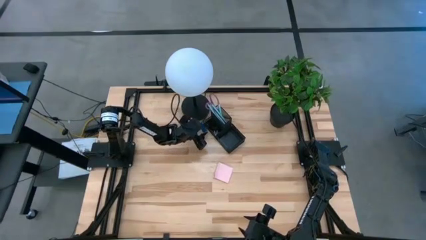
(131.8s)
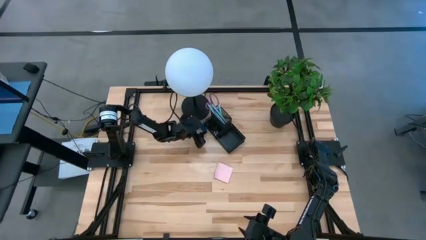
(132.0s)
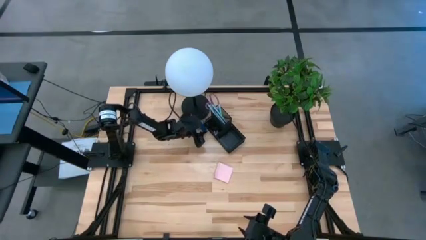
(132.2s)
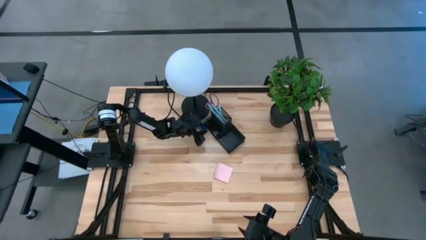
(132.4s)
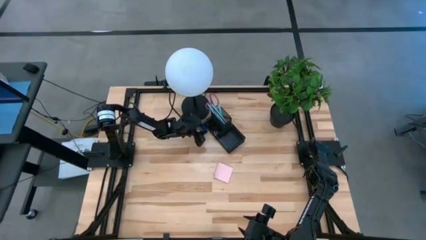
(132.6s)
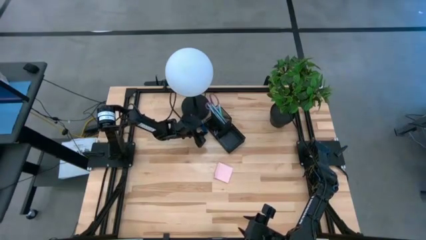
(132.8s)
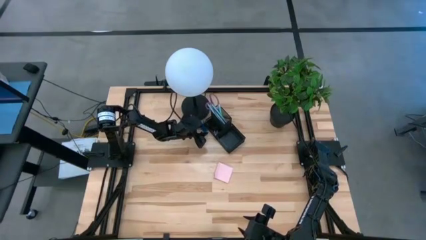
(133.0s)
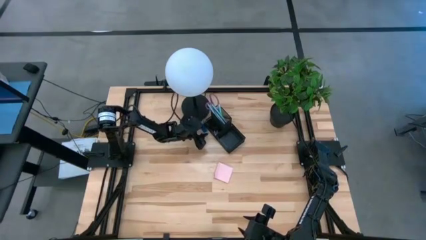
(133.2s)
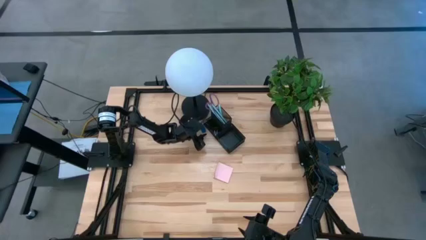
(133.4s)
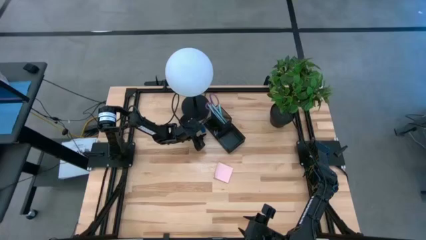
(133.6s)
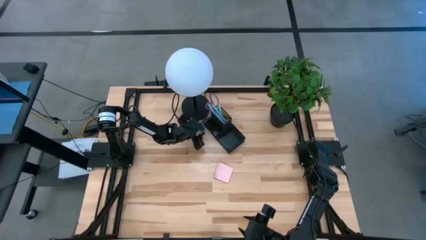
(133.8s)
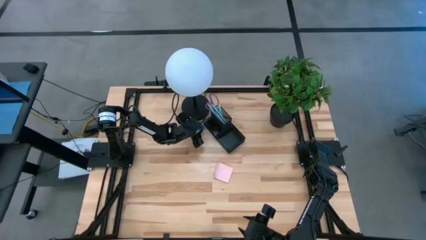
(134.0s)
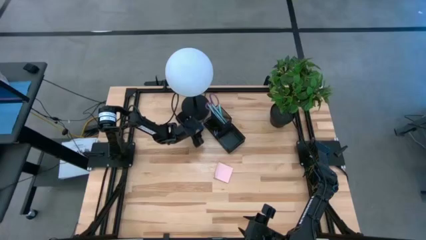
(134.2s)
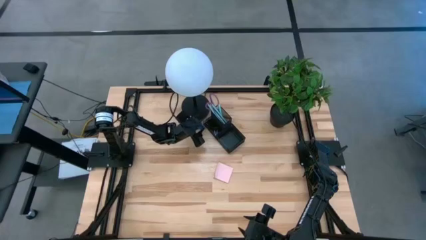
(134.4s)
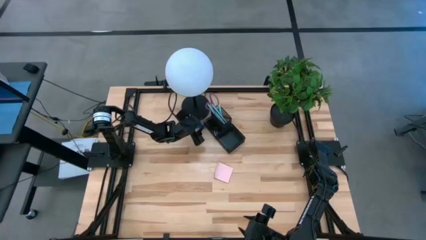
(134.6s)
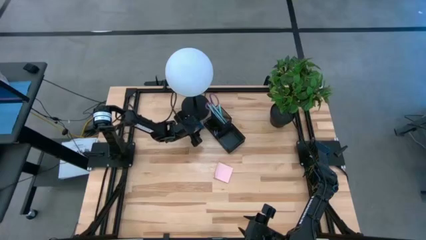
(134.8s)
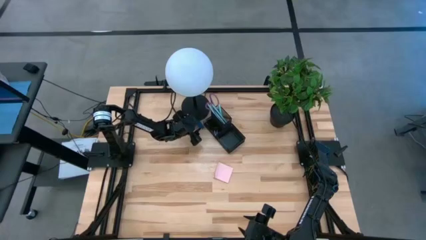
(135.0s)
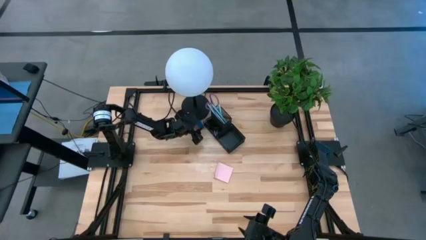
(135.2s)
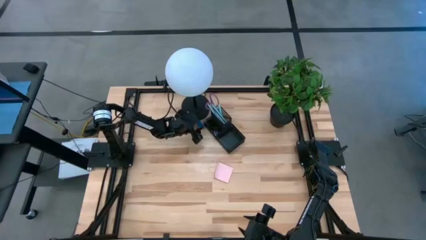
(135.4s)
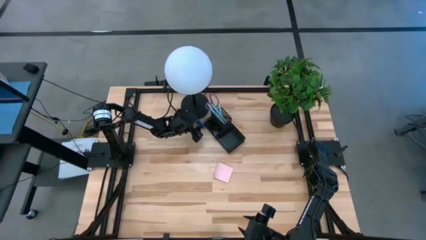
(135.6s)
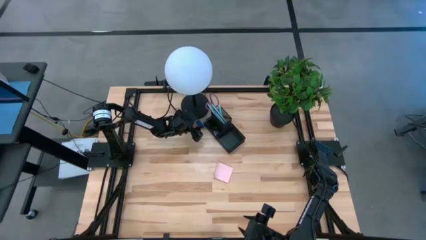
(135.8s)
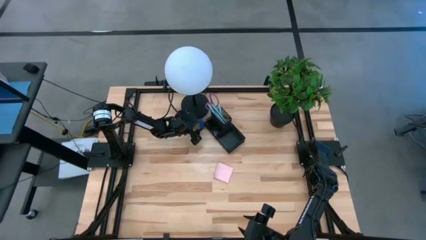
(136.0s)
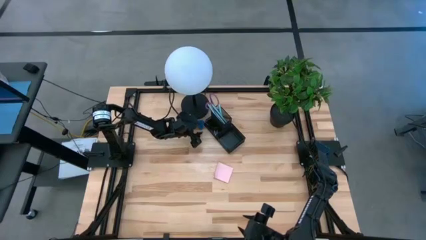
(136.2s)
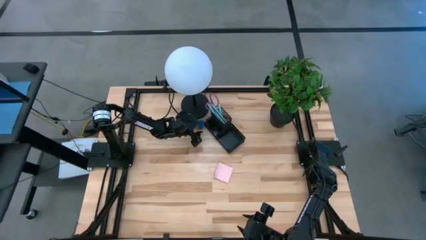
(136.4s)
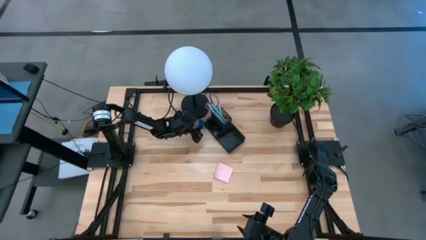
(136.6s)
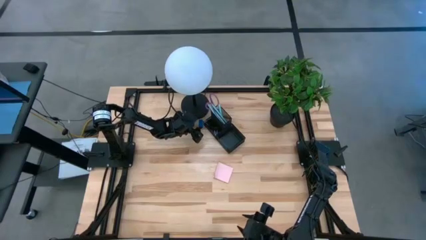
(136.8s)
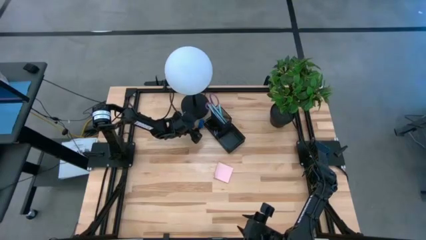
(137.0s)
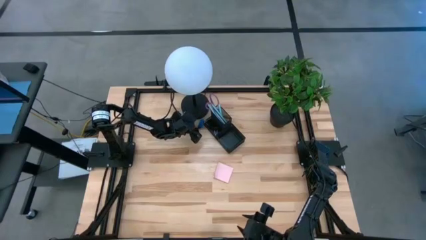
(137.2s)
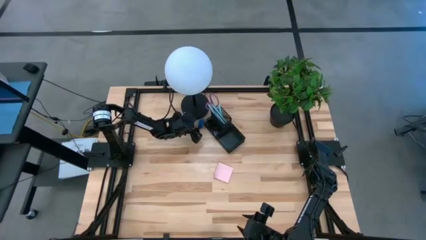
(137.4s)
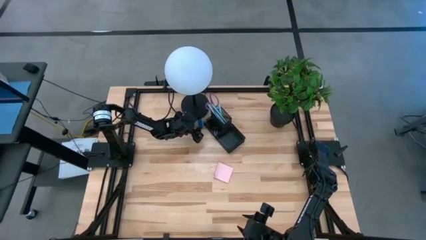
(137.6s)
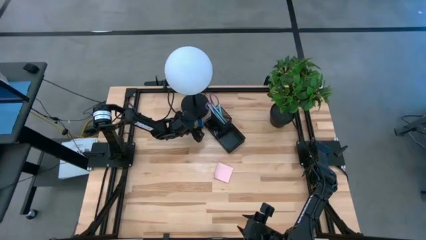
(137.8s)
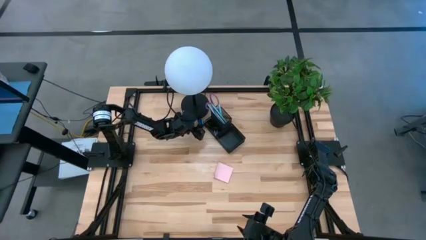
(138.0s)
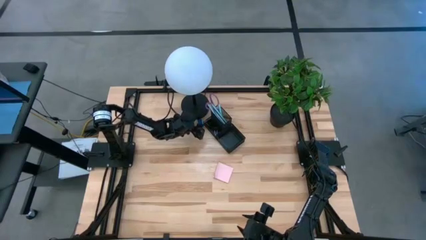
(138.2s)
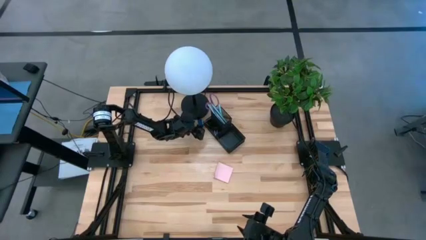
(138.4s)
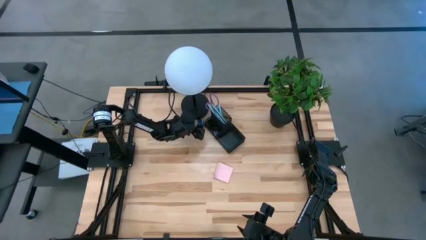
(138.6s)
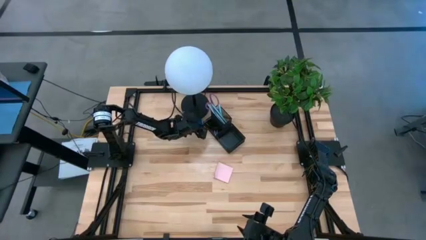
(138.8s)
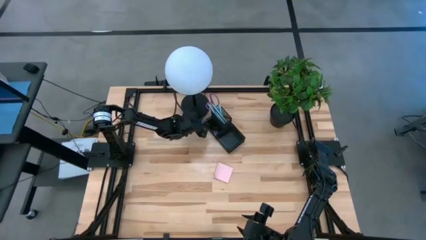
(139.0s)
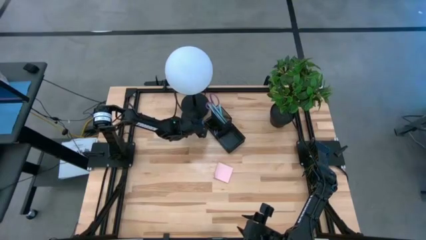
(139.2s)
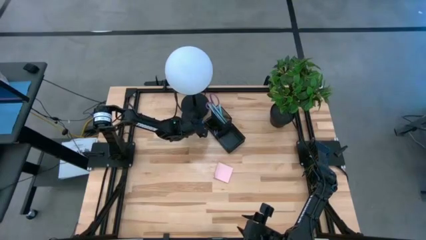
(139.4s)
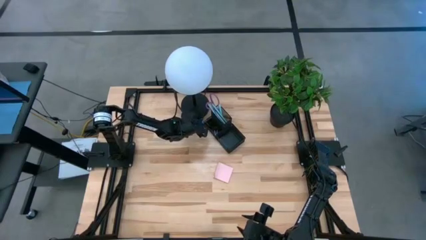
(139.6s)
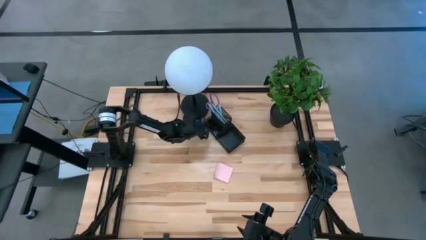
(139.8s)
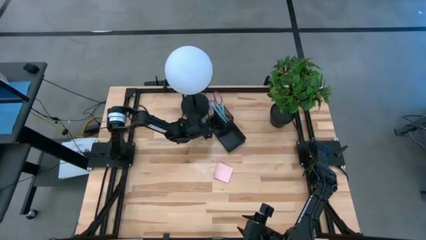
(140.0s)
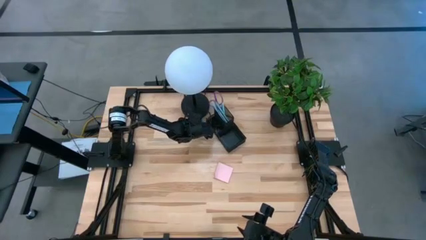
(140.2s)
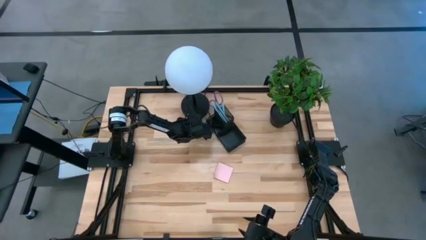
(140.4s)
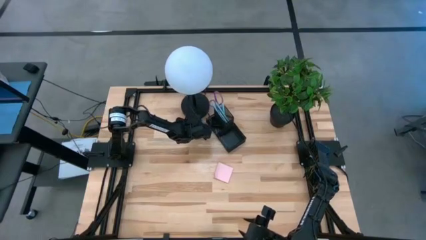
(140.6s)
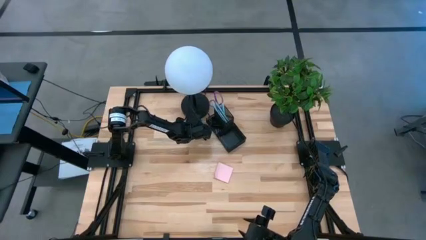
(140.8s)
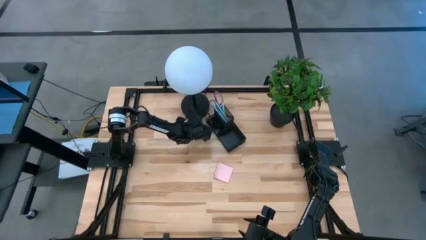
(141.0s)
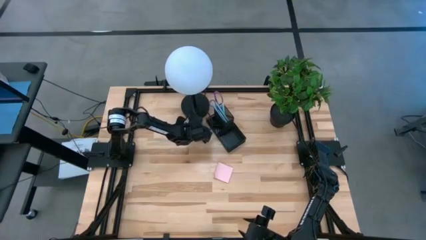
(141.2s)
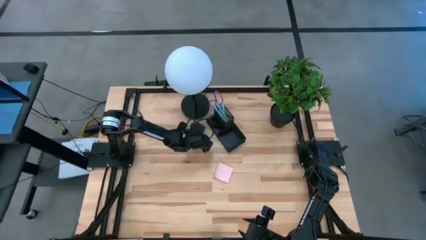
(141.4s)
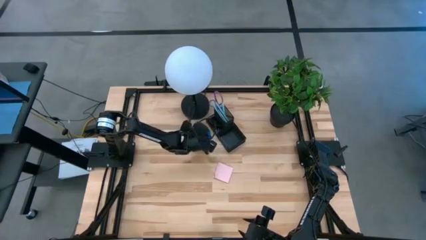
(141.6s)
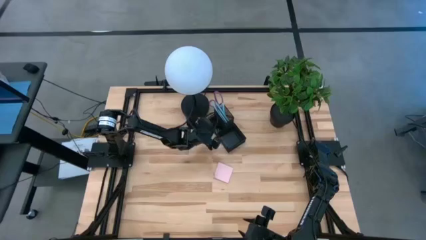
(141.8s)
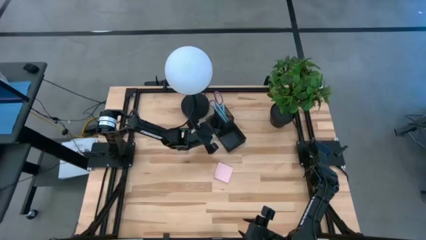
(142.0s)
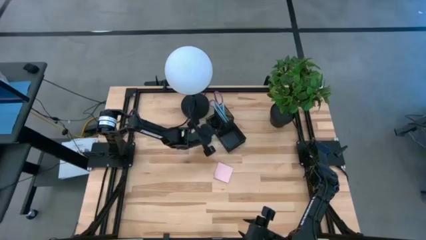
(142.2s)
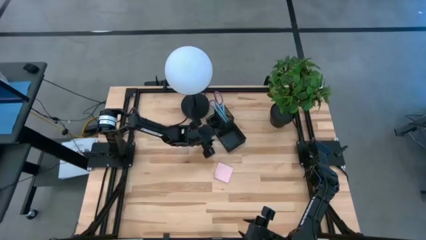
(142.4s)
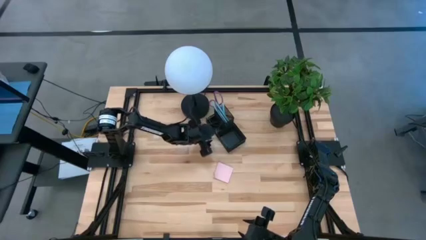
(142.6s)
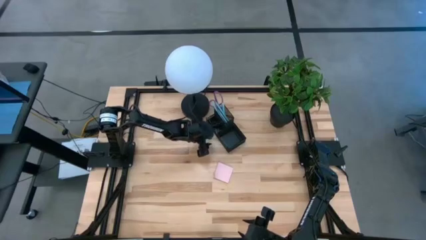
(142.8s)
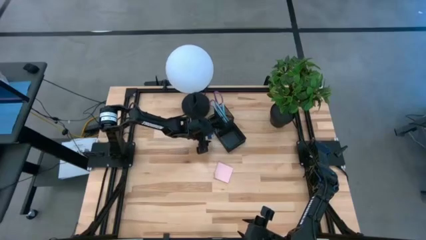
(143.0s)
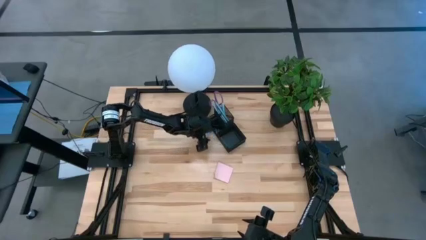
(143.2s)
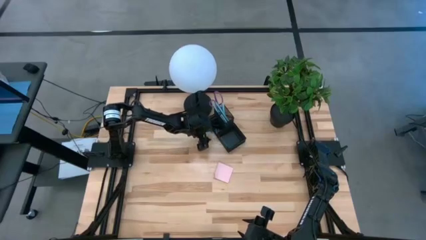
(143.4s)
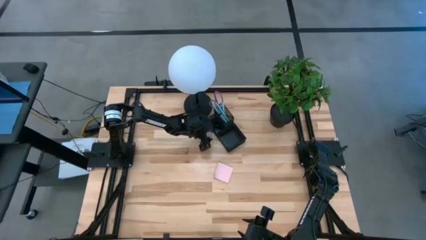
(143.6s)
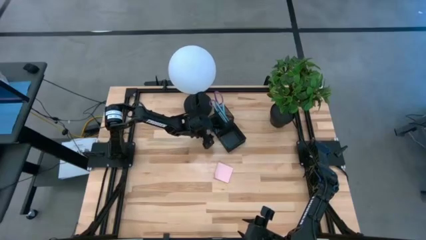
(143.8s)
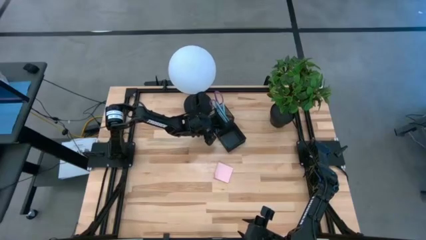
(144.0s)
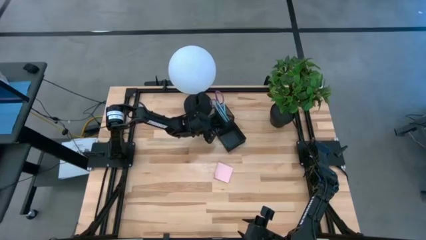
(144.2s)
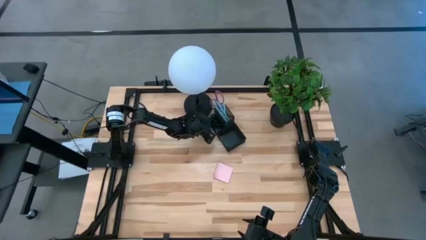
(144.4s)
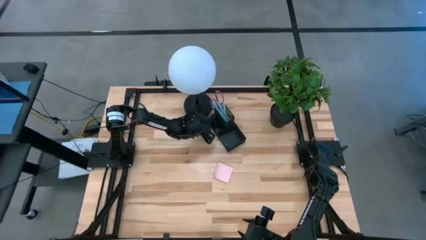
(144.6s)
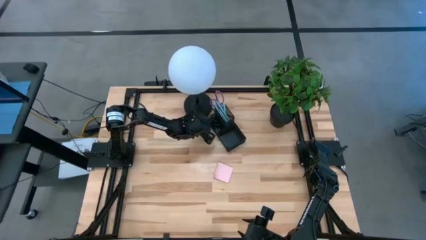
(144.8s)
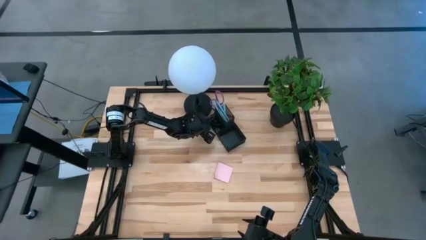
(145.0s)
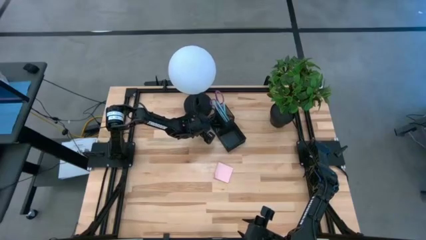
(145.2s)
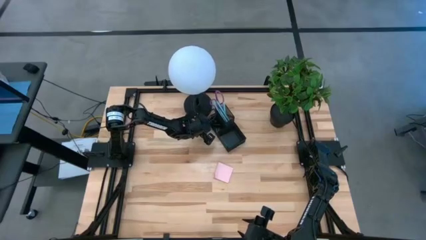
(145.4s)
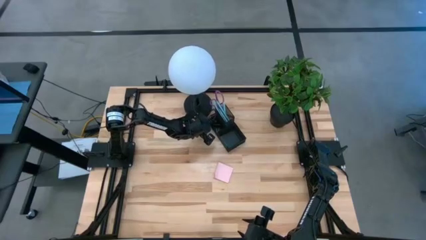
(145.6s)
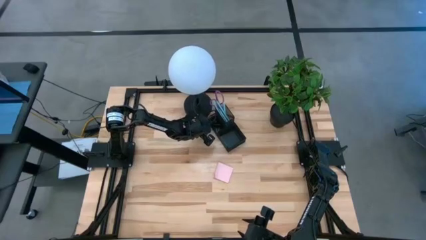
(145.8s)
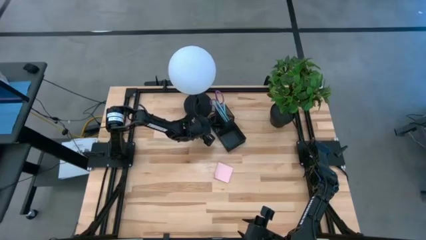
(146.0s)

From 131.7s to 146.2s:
Task: Pick and place office supplies into organizer
Put the blue eraser into the desk organizer

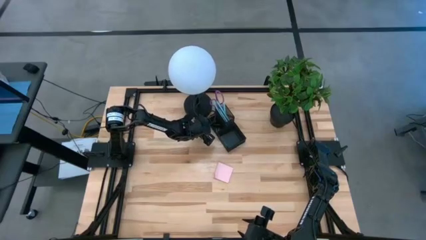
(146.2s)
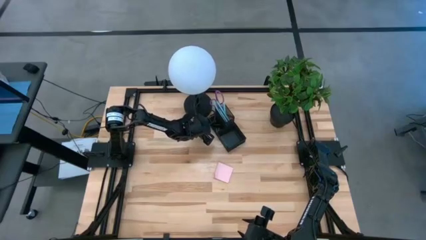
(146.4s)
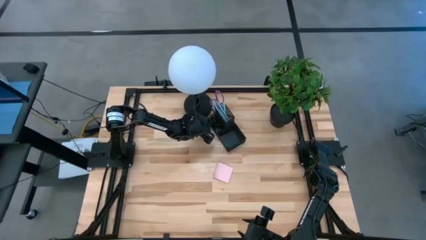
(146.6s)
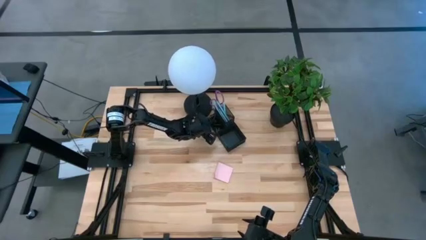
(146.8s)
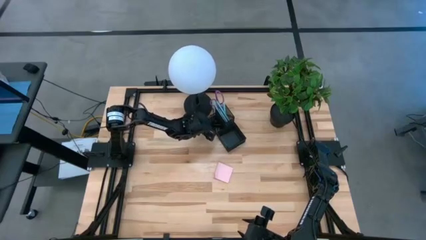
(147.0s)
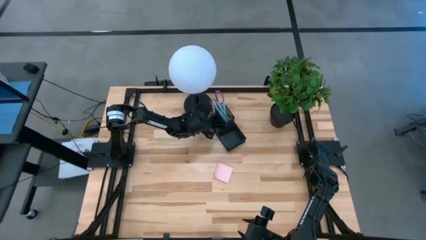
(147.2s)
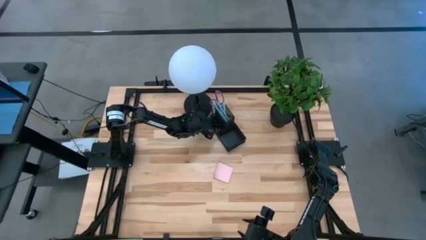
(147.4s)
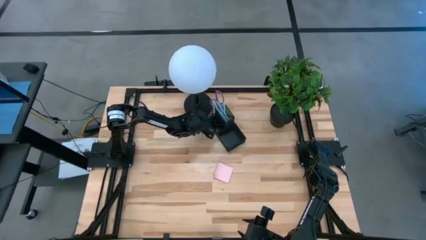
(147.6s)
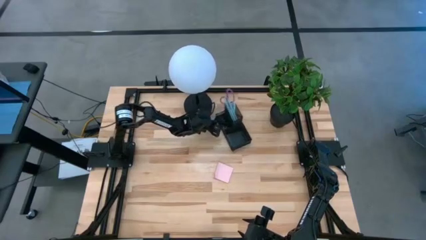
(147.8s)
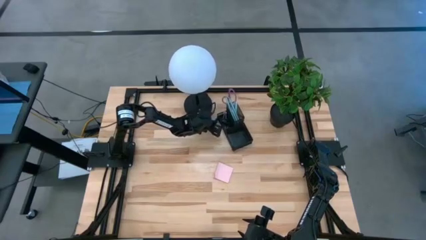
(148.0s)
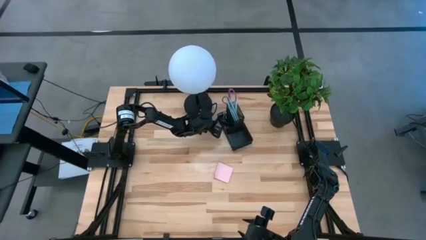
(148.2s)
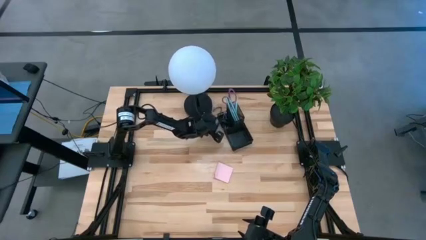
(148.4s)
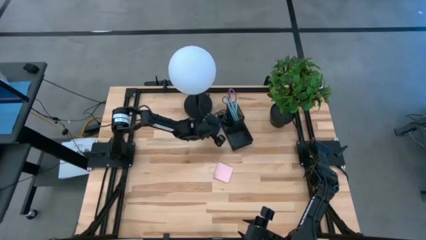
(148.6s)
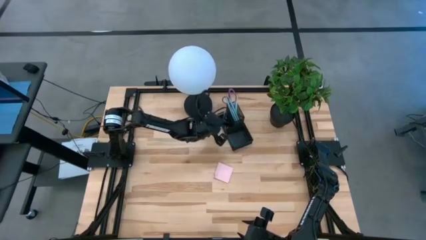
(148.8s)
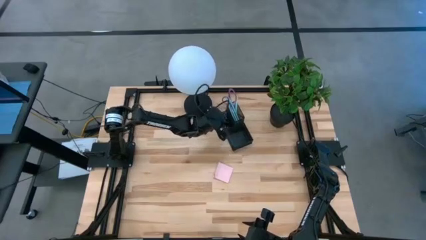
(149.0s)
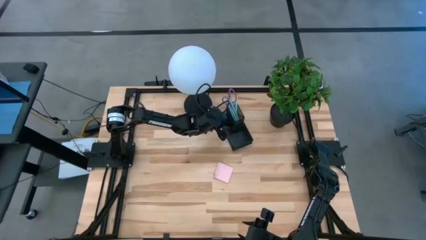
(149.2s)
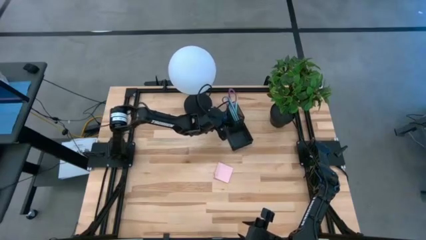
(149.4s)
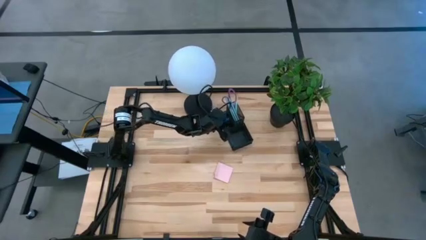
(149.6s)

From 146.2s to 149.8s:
Put the blue eraser into the desk organizer
